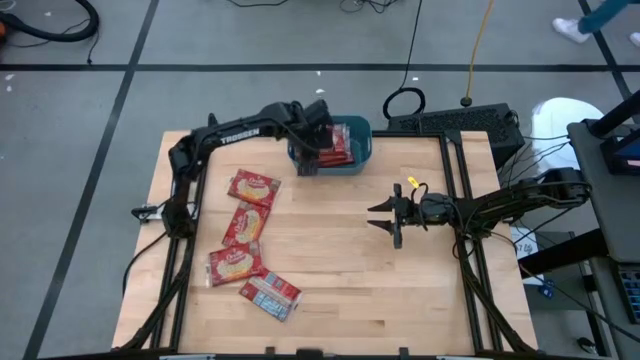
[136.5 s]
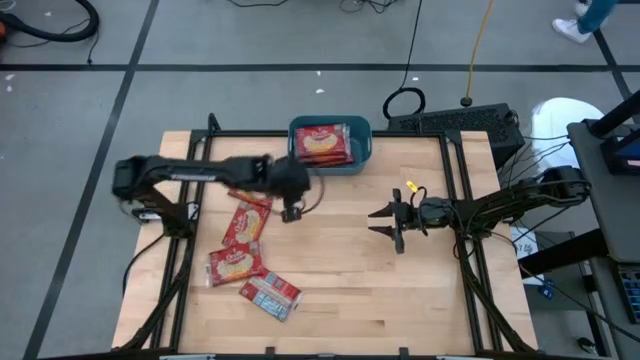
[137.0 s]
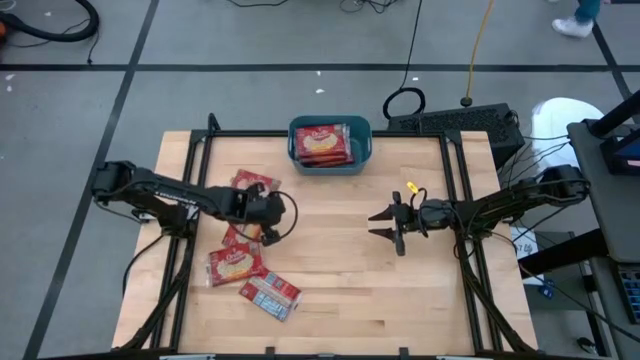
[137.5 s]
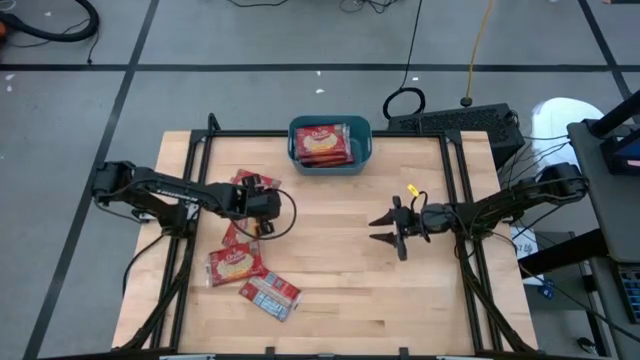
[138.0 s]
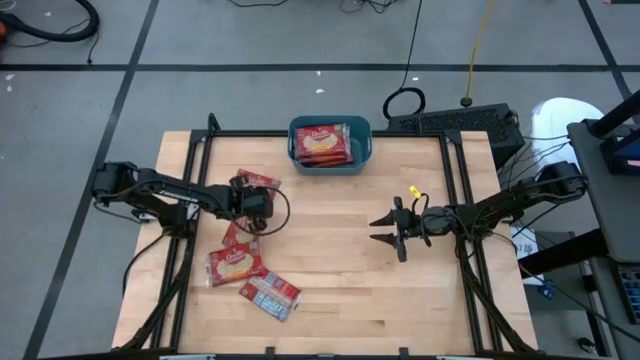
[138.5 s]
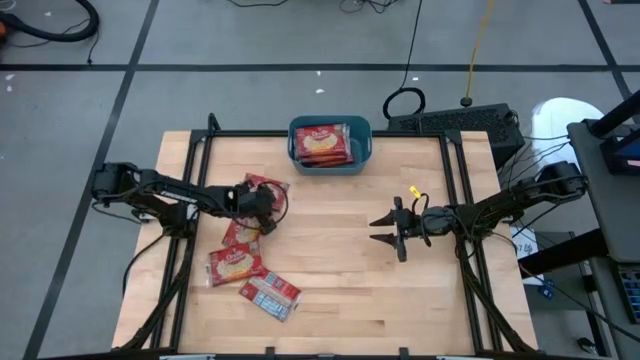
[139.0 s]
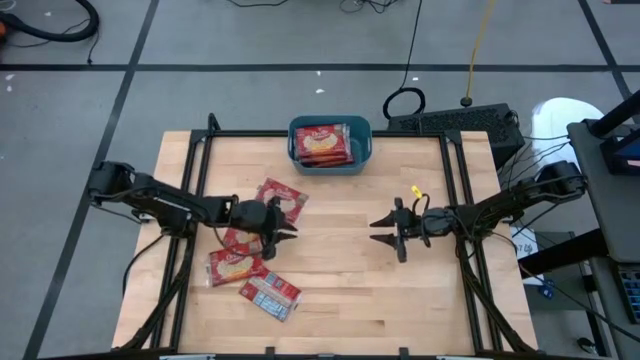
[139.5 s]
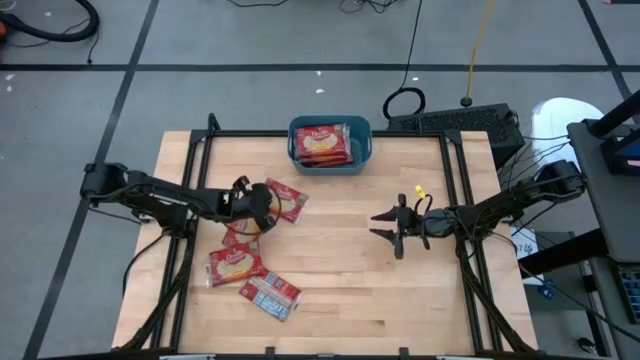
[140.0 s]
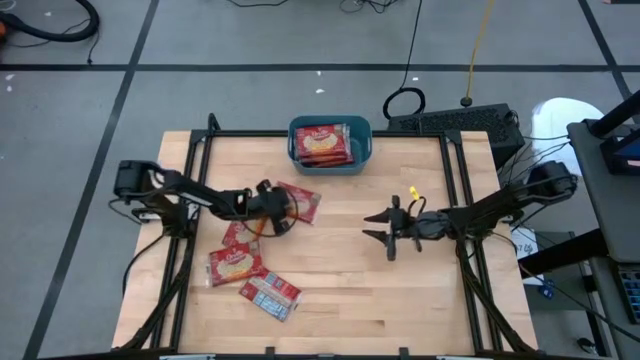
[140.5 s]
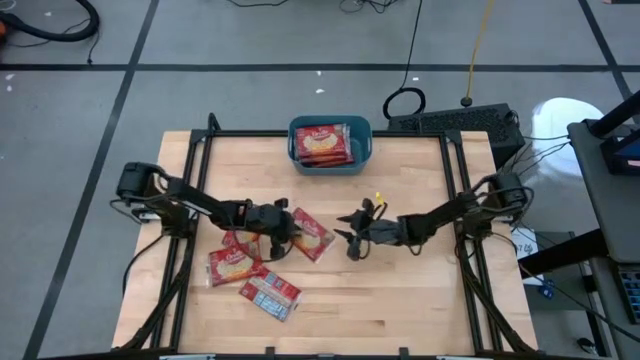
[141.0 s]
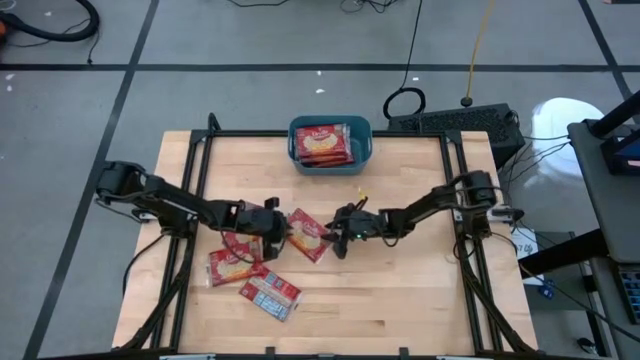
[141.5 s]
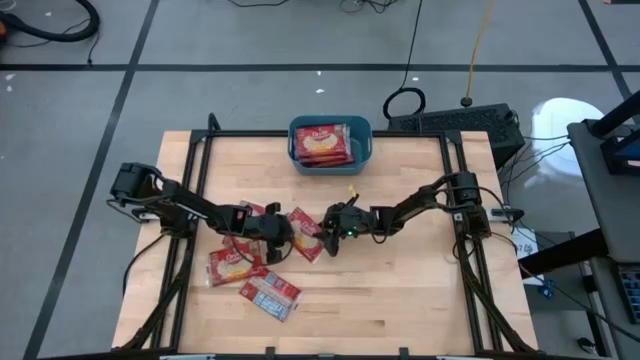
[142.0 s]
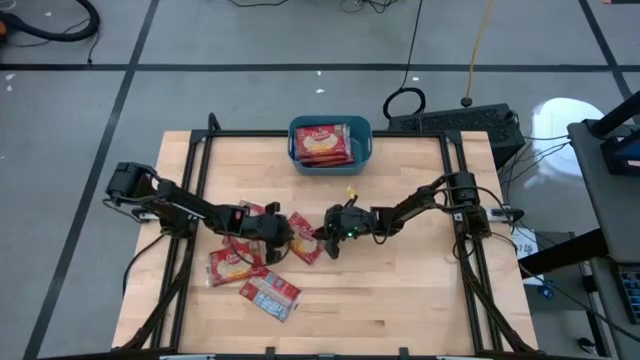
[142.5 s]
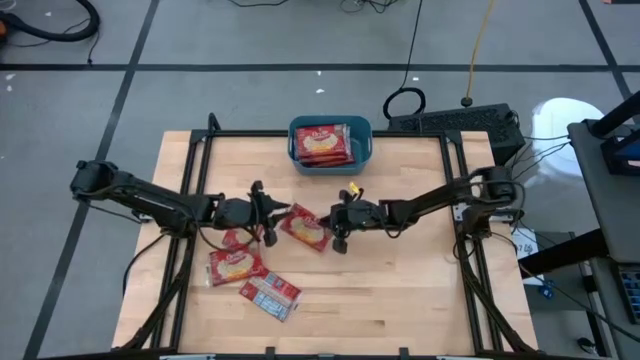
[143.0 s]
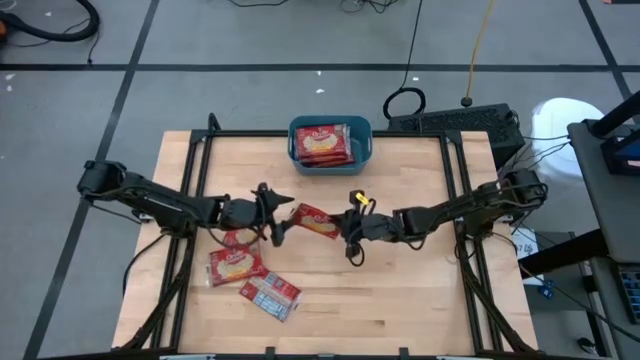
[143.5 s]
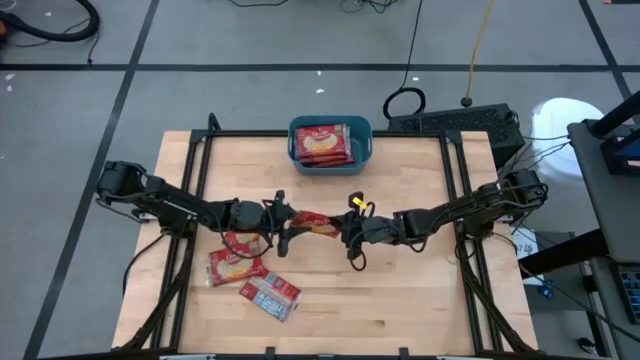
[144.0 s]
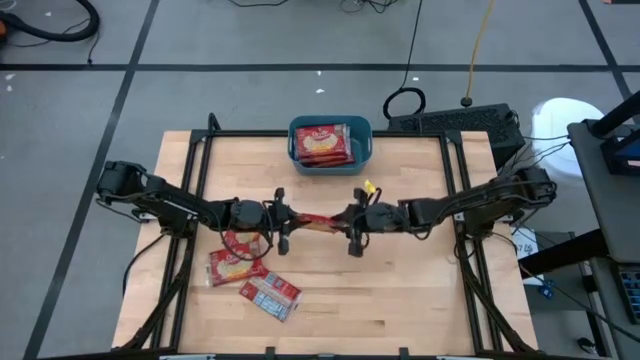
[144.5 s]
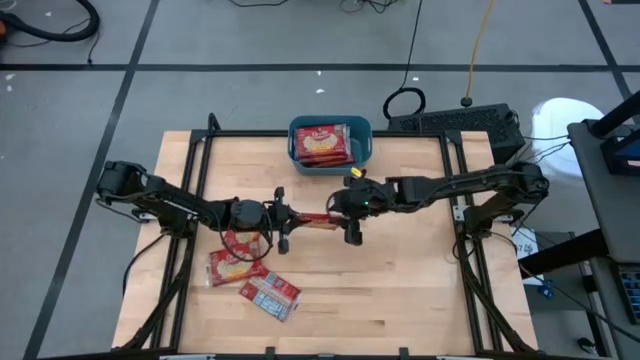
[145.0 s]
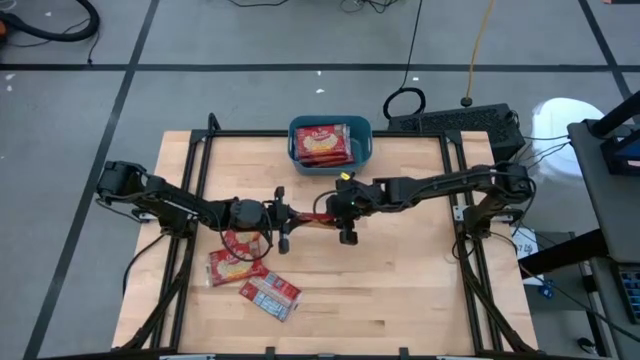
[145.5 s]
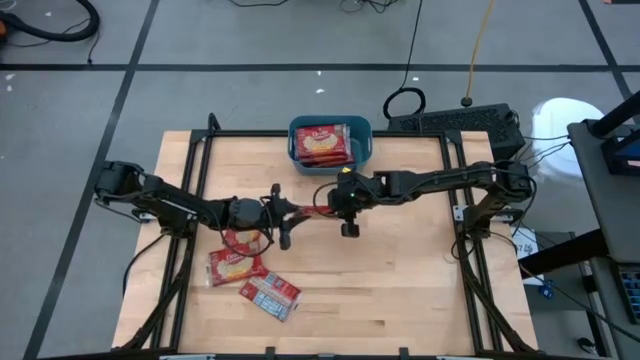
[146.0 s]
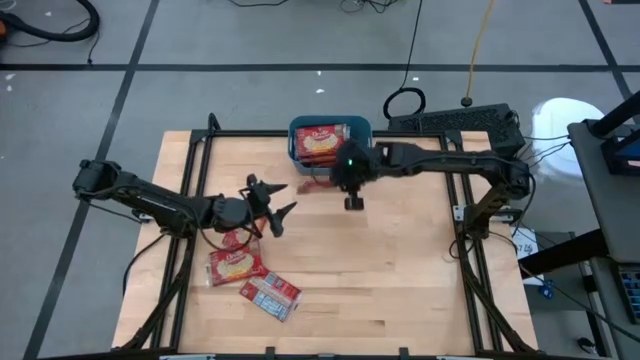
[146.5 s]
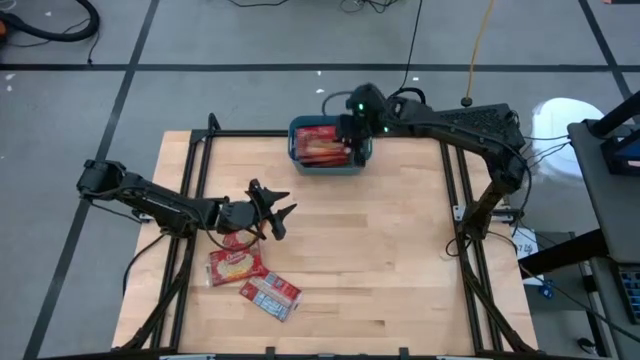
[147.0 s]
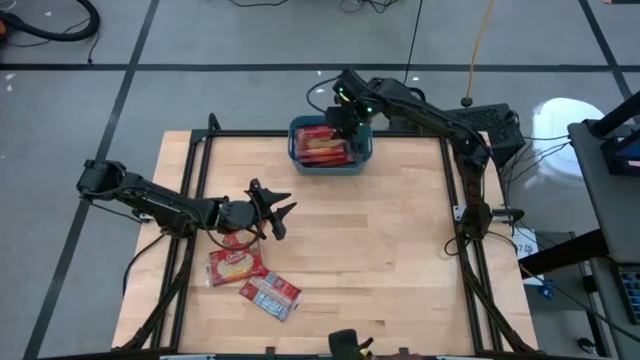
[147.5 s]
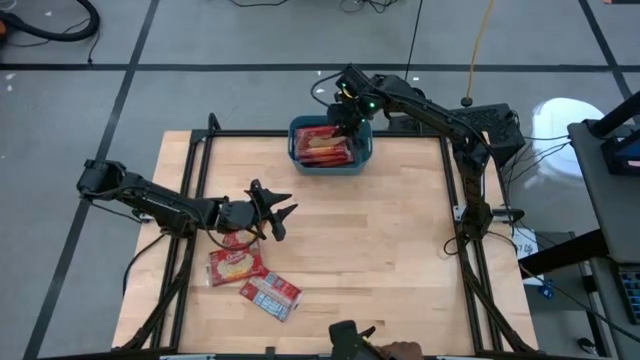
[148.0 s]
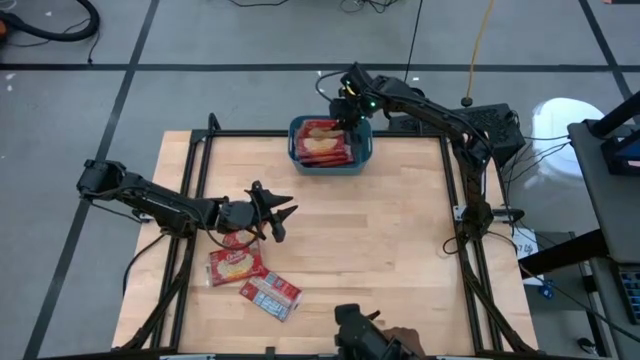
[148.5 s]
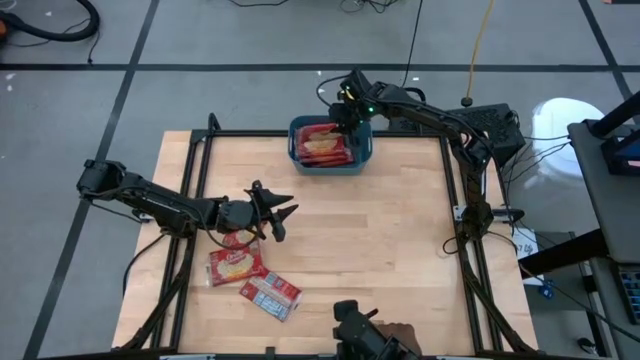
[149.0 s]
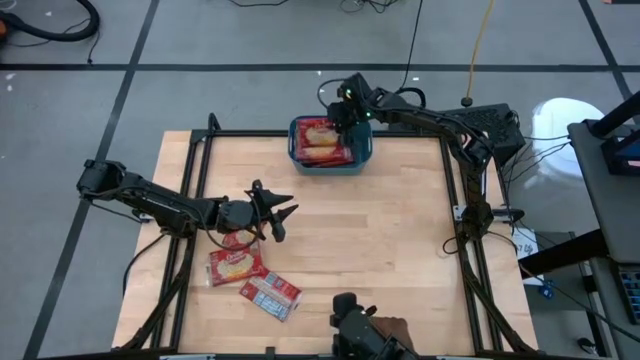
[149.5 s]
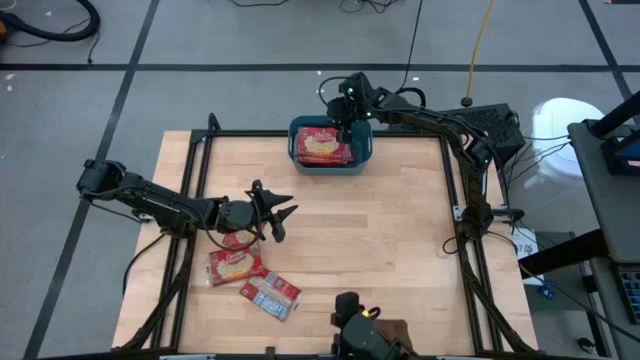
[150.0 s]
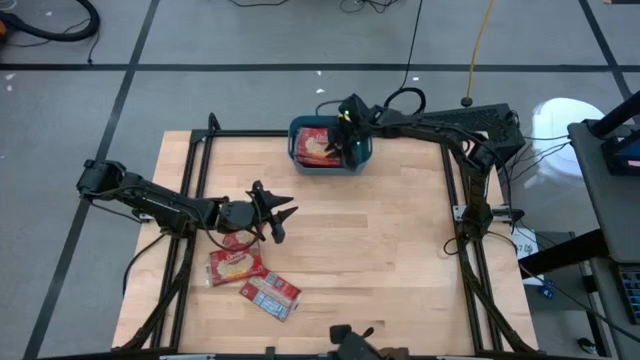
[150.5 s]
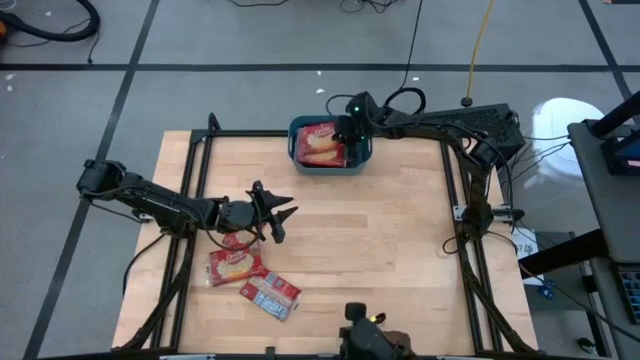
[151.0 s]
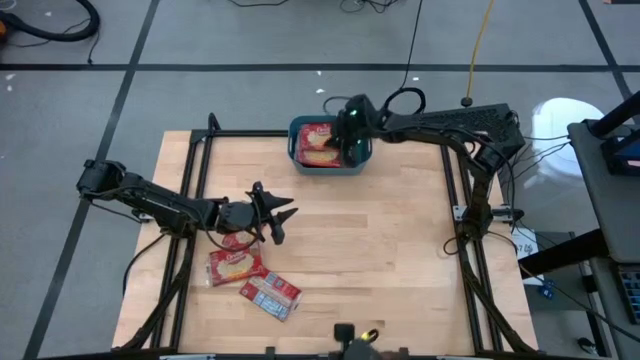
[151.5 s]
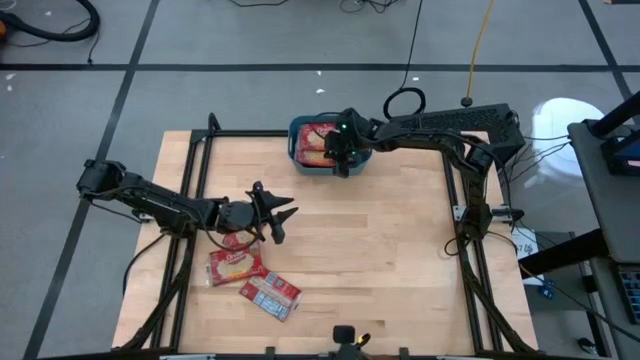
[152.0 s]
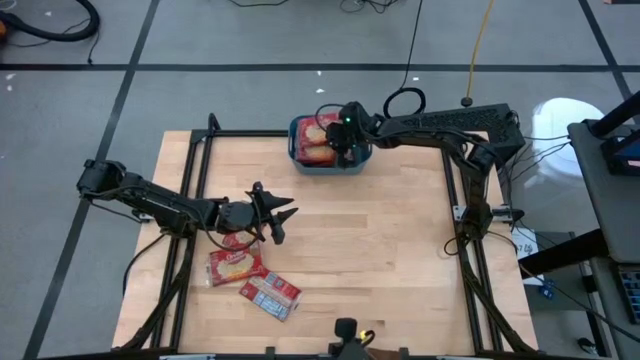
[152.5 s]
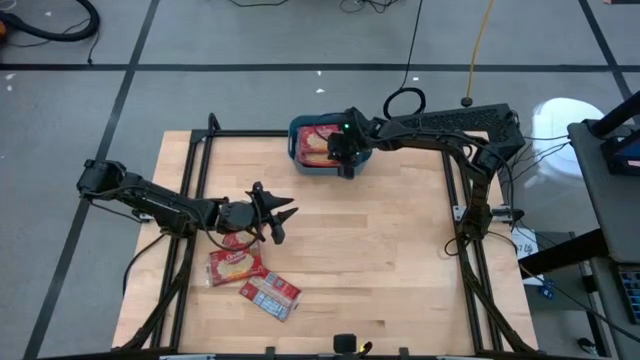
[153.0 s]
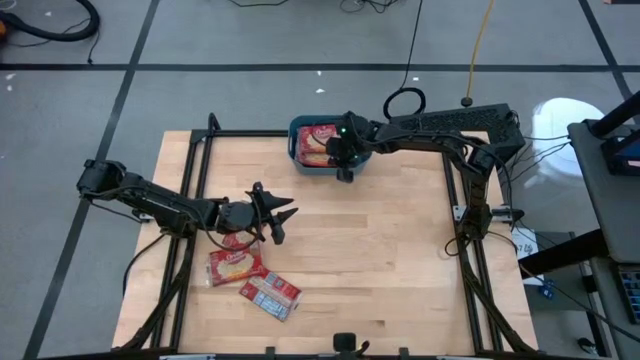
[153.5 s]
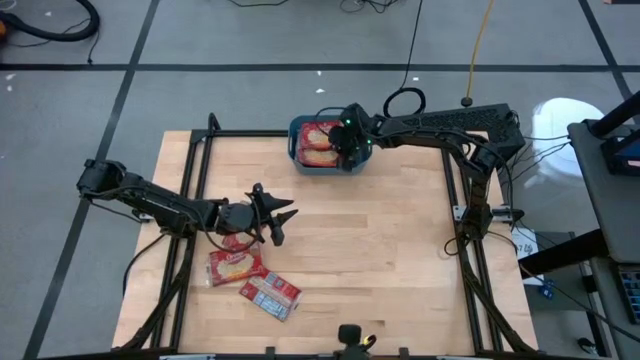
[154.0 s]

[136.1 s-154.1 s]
Task: Sort popcorn bags into baskets
Put the red popcorn bag into the blue bin
